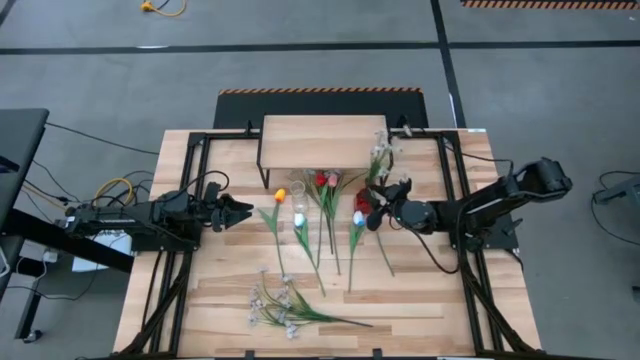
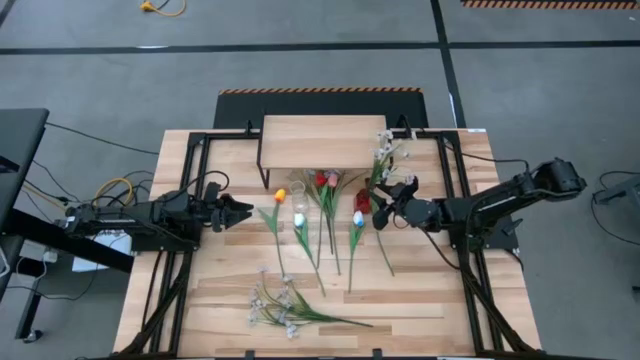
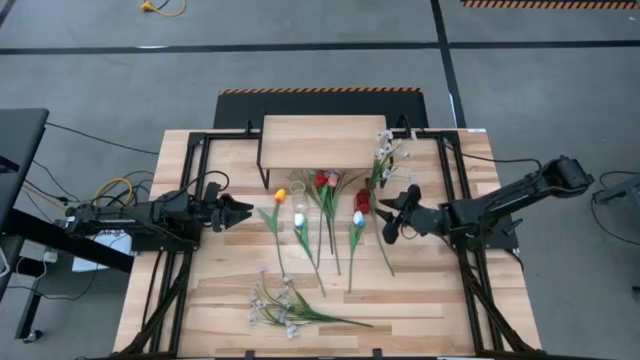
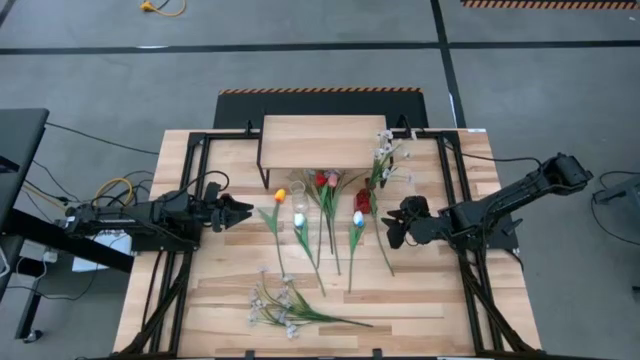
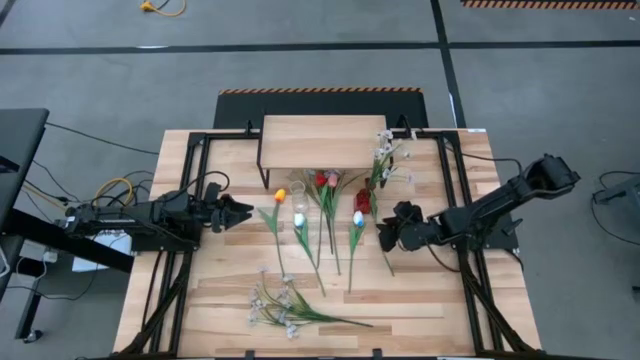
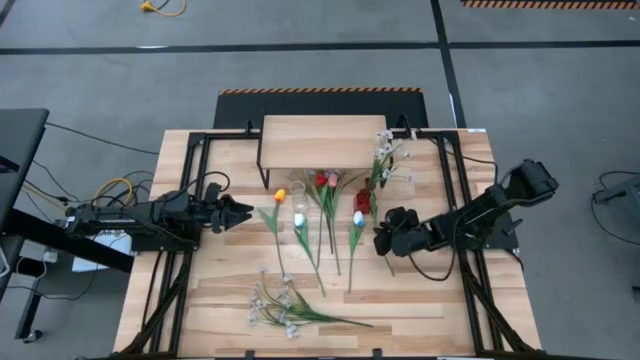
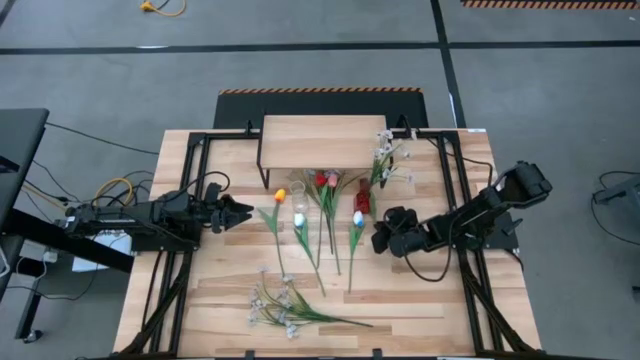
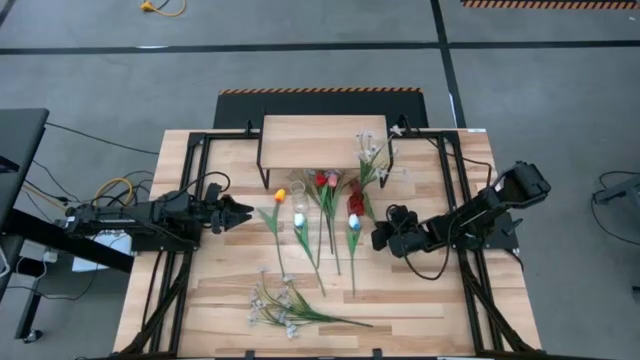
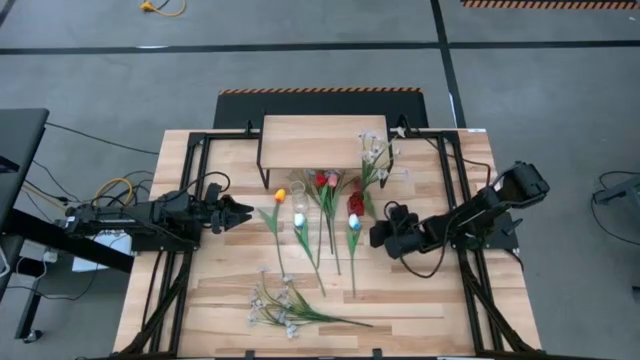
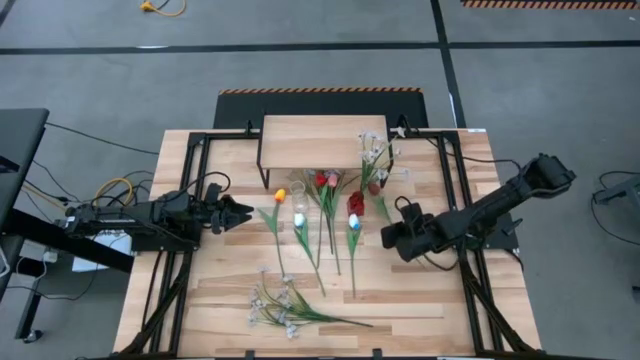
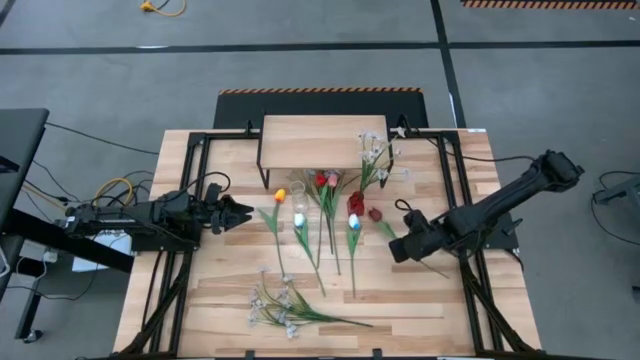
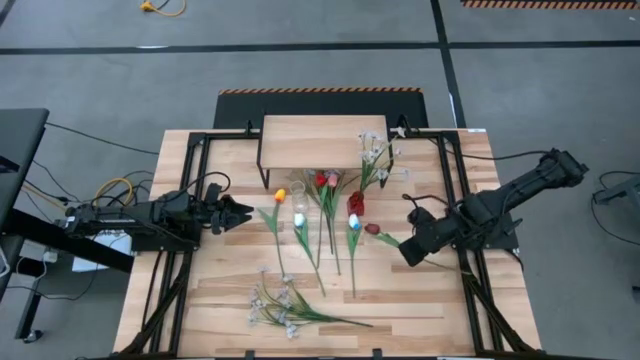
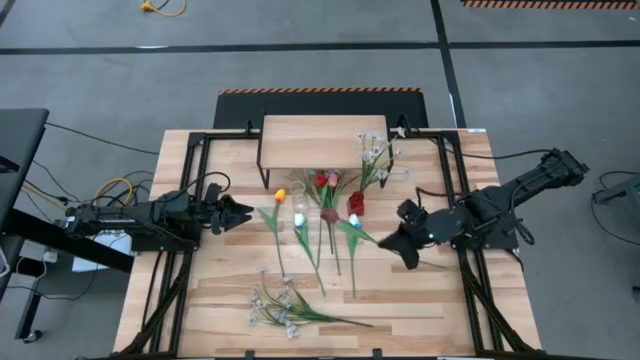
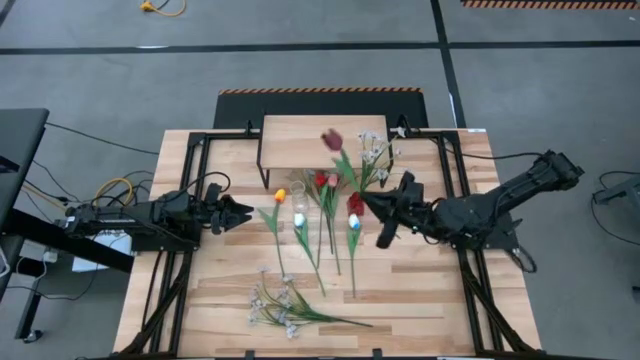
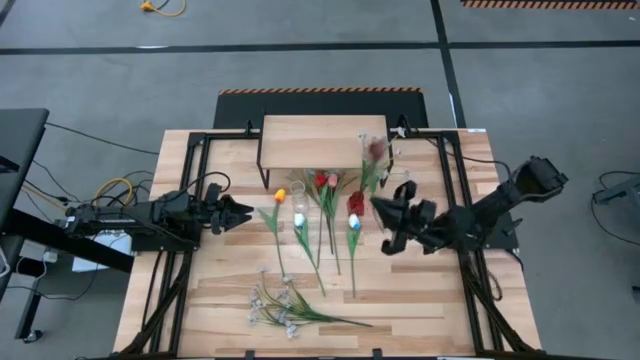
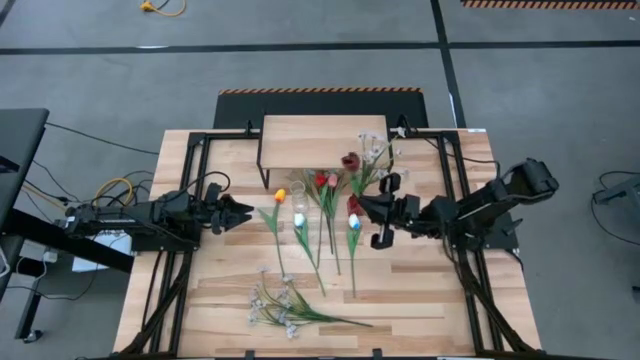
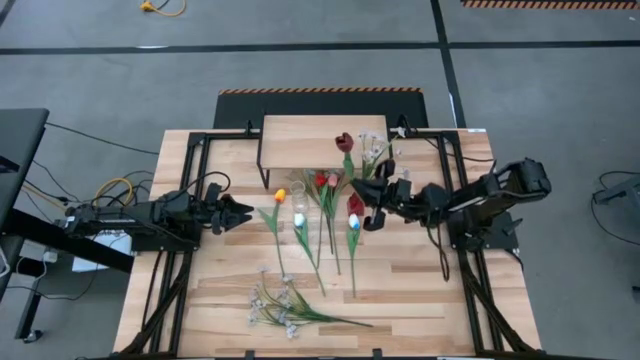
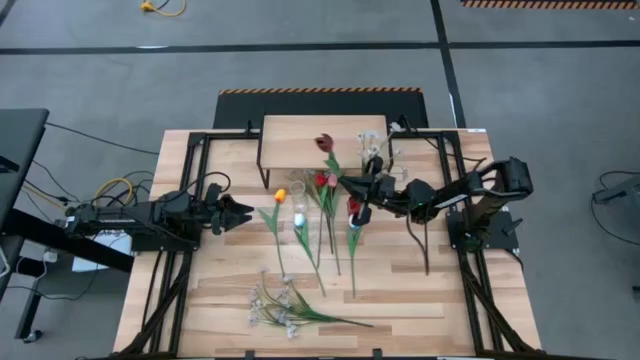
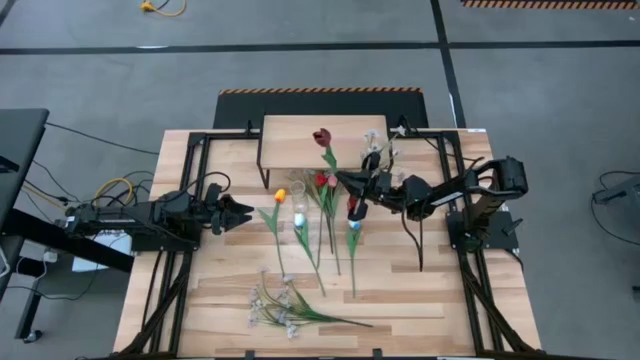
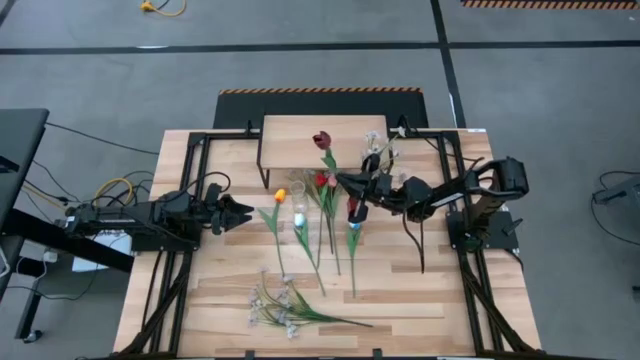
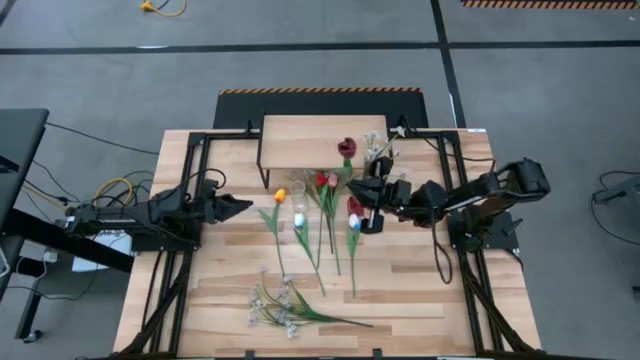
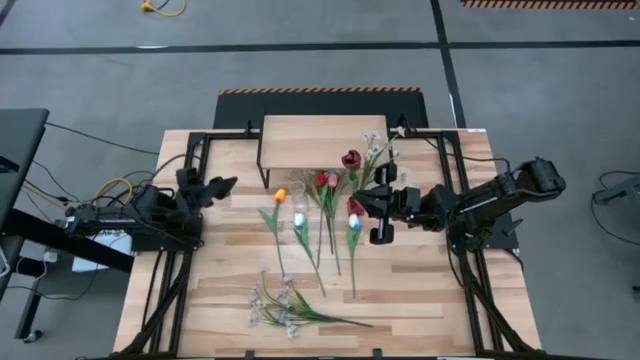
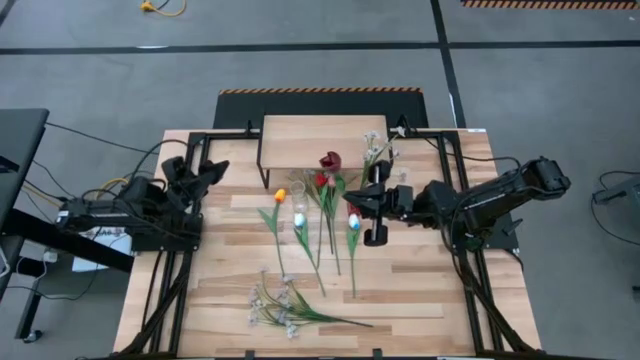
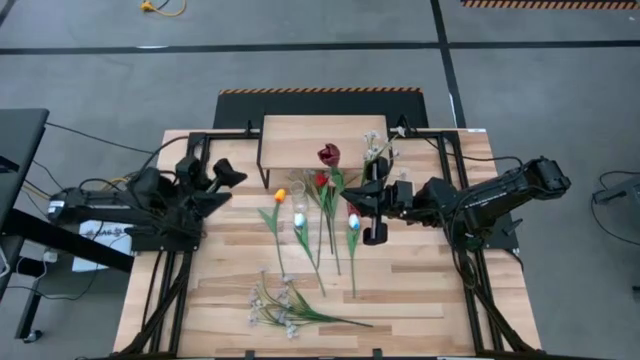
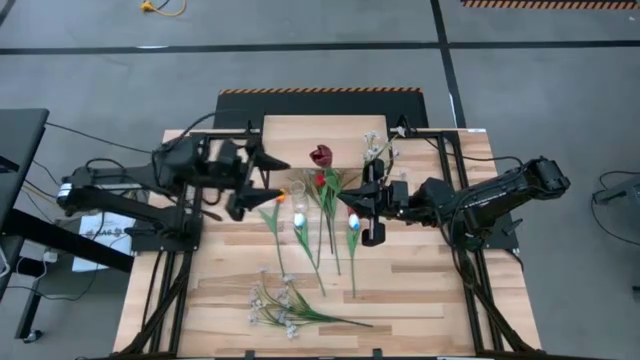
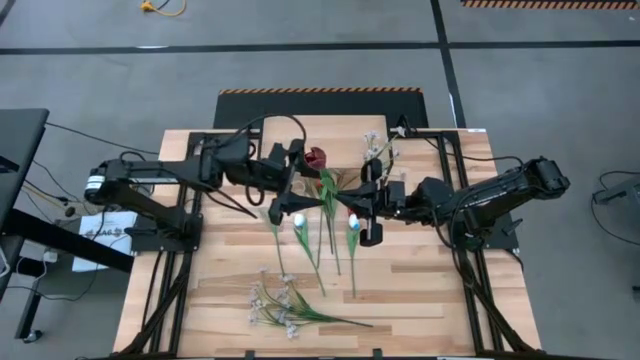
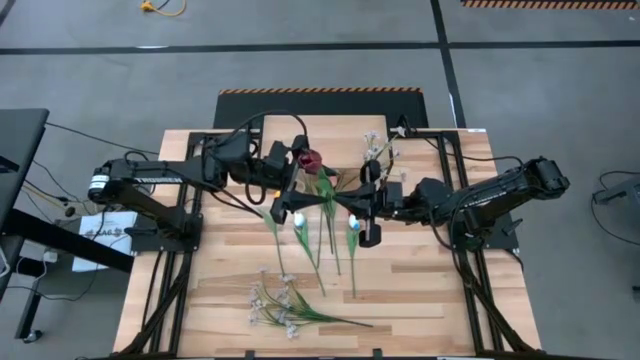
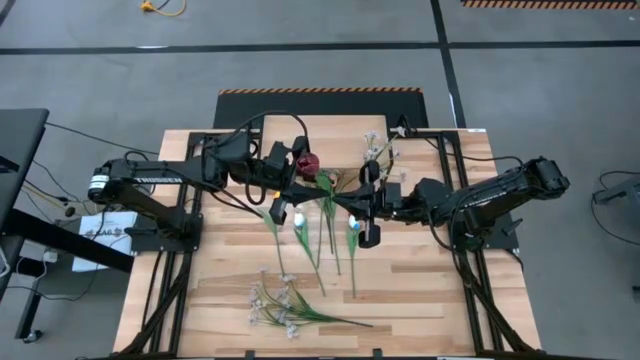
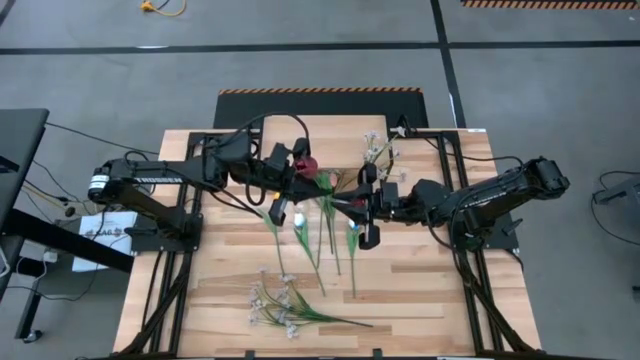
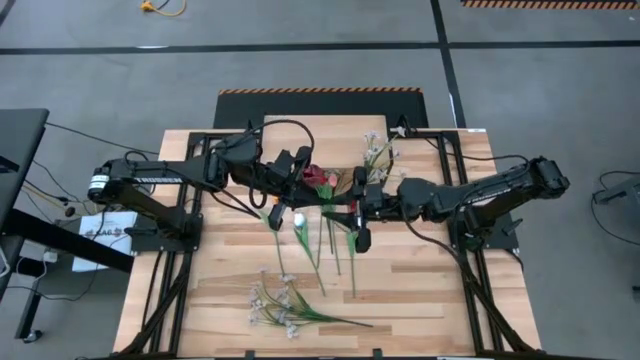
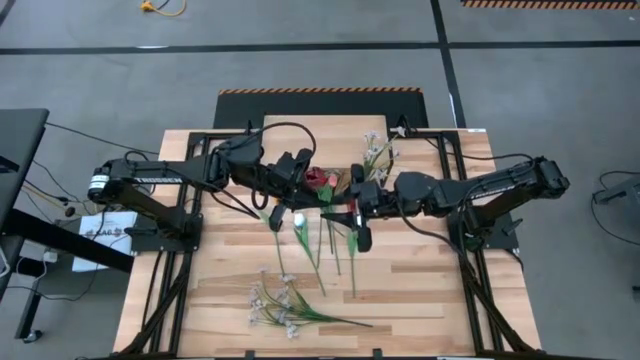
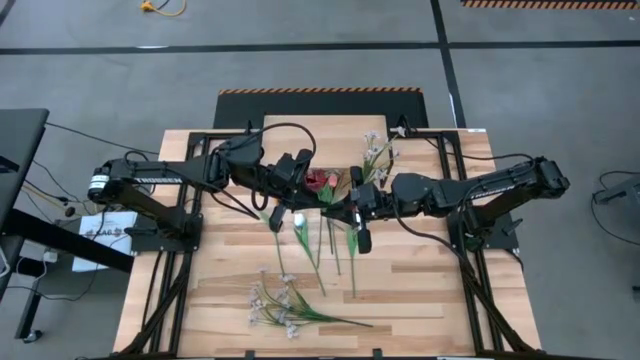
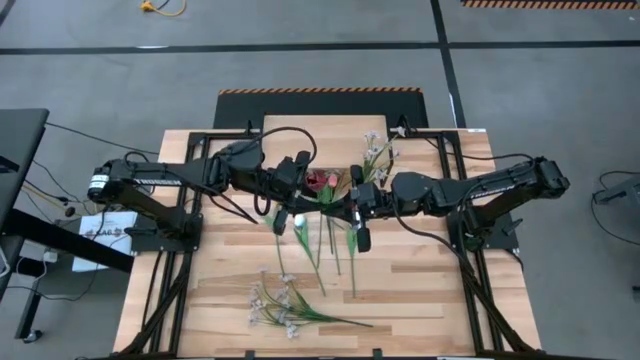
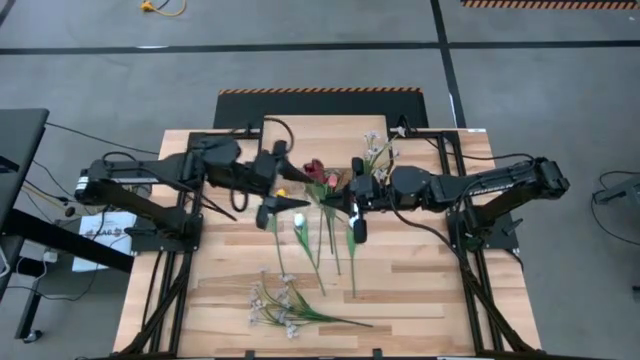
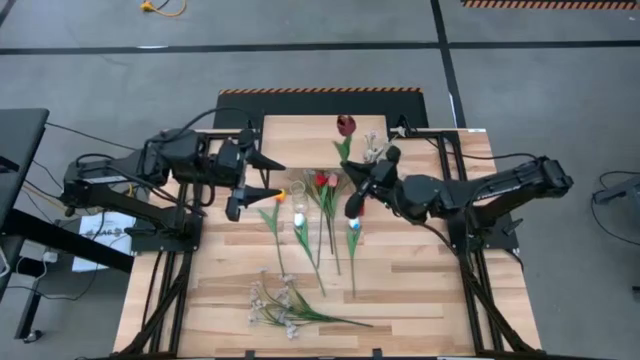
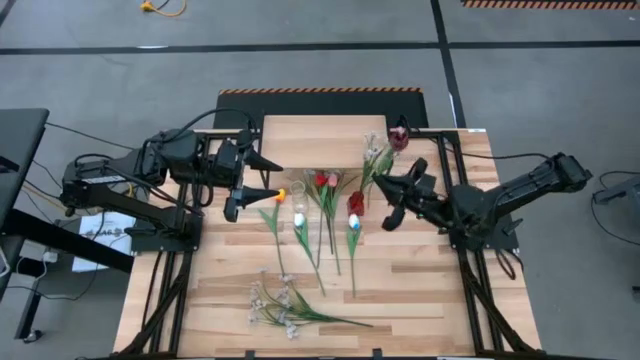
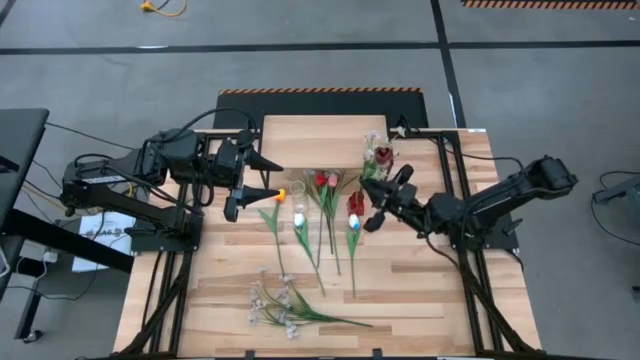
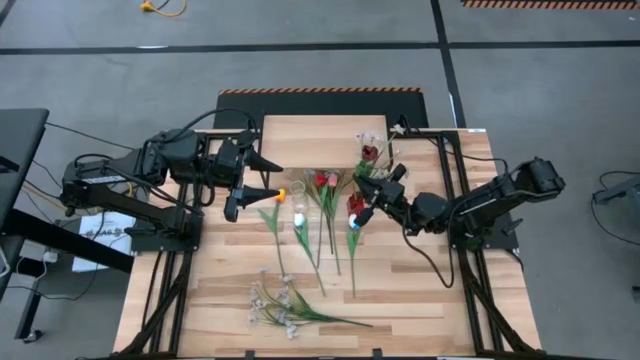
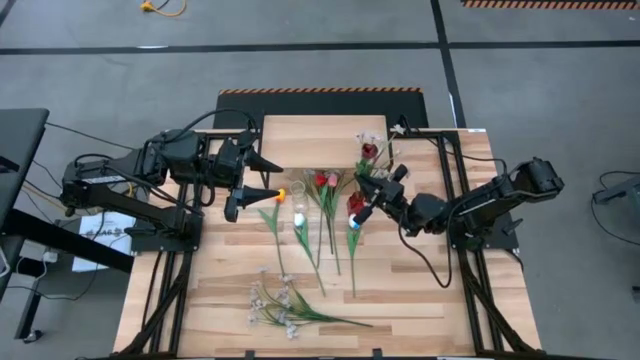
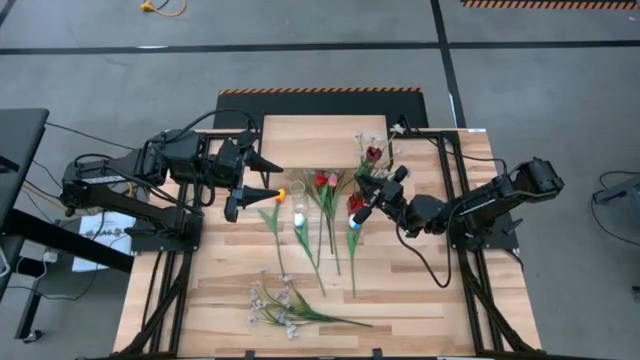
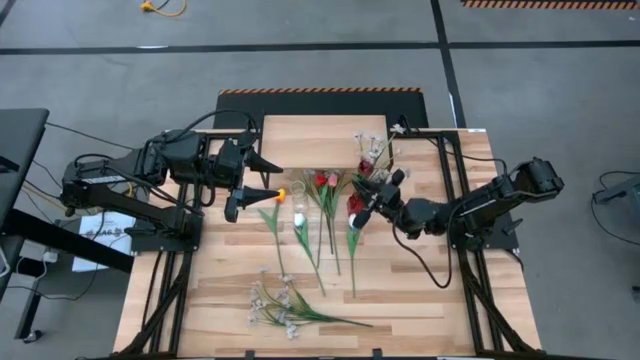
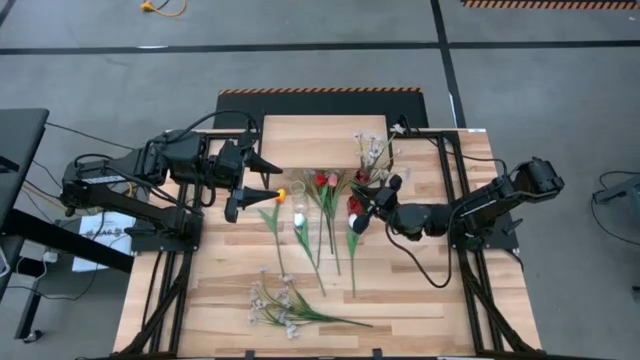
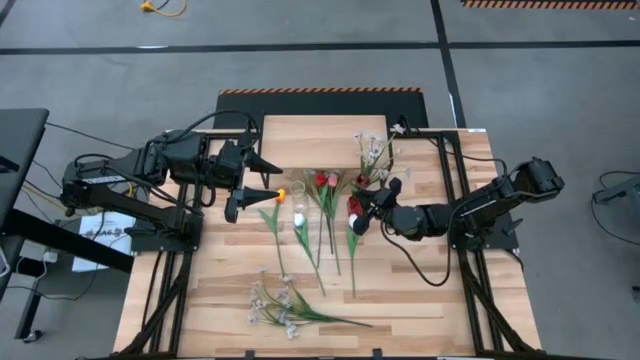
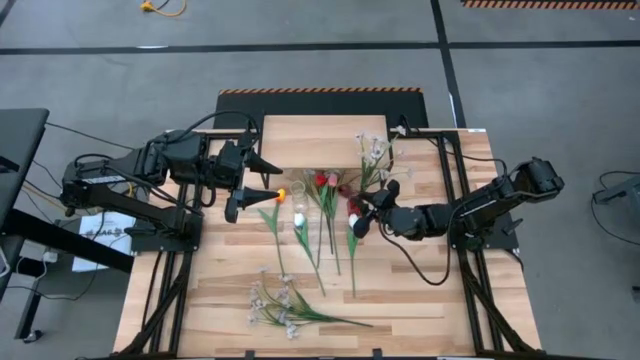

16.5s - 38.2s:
Task: Pick and place flowers into a vace then onto a shelf
Put the dark red flower into the red vase
